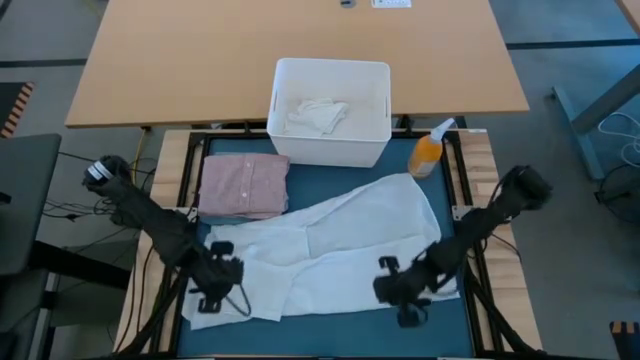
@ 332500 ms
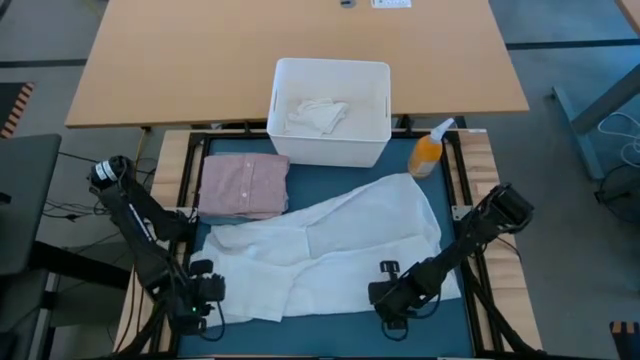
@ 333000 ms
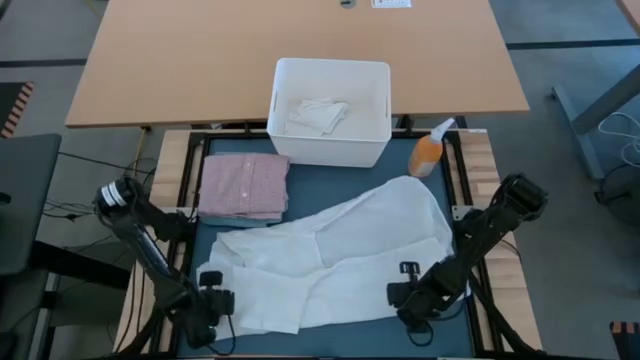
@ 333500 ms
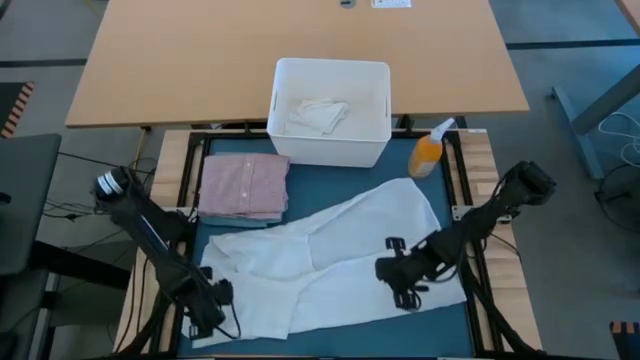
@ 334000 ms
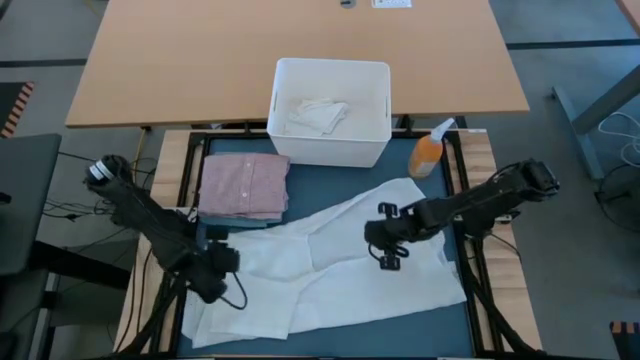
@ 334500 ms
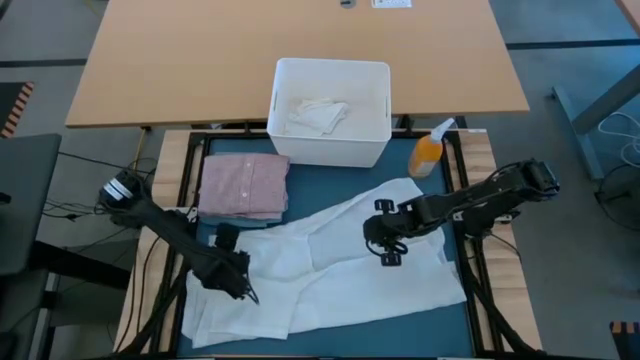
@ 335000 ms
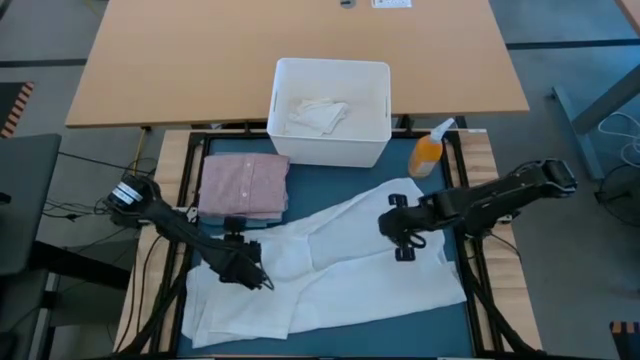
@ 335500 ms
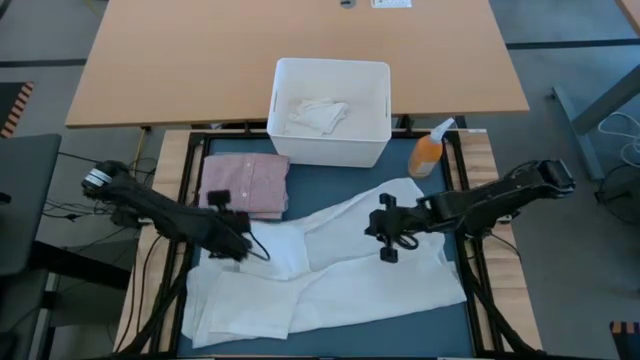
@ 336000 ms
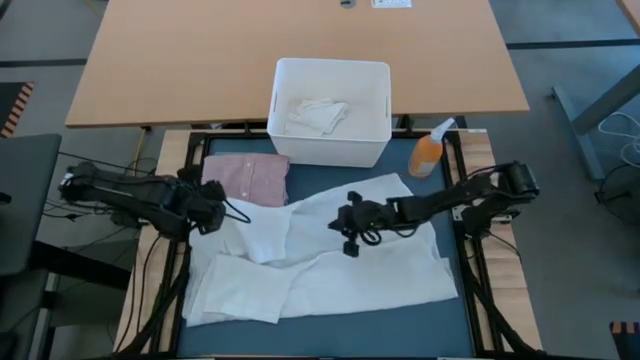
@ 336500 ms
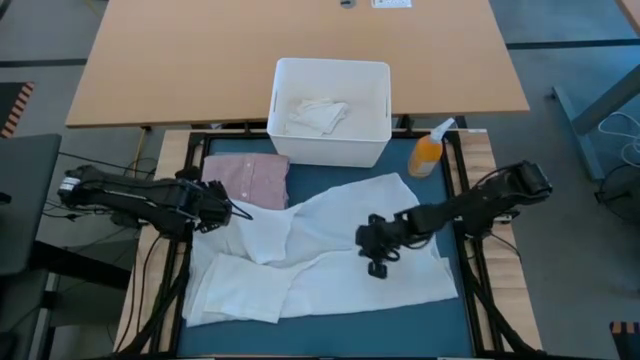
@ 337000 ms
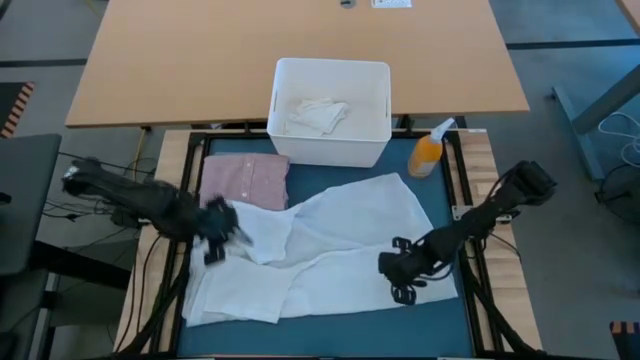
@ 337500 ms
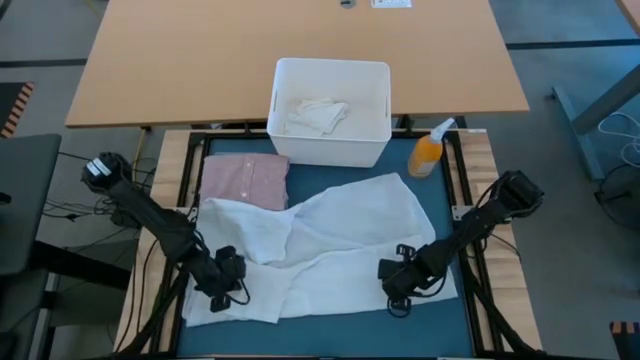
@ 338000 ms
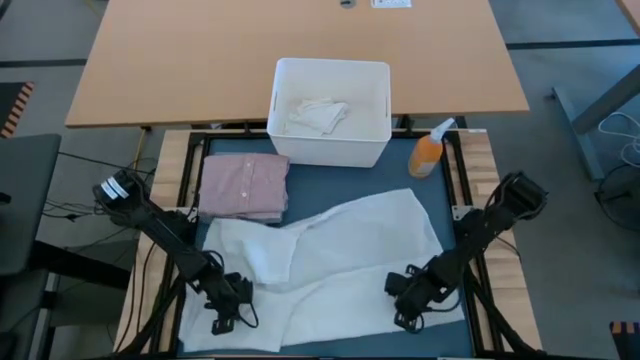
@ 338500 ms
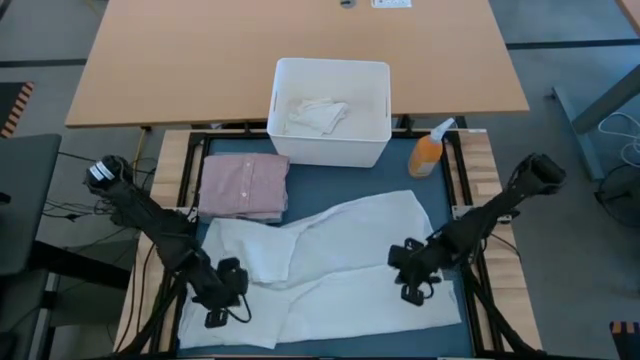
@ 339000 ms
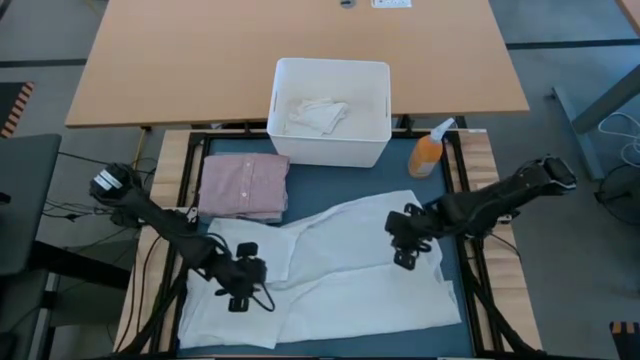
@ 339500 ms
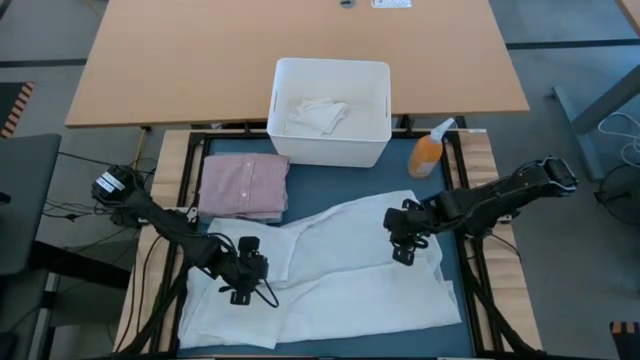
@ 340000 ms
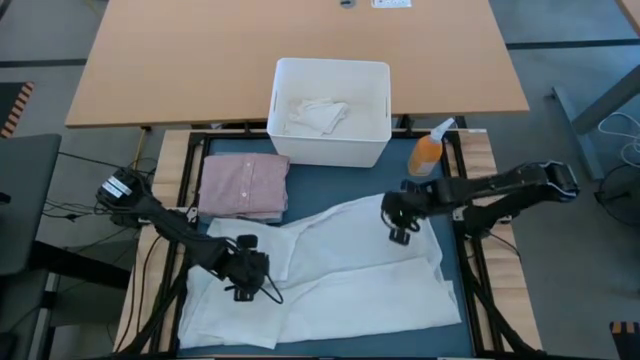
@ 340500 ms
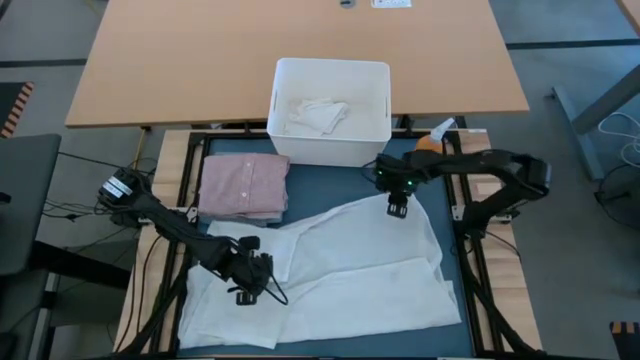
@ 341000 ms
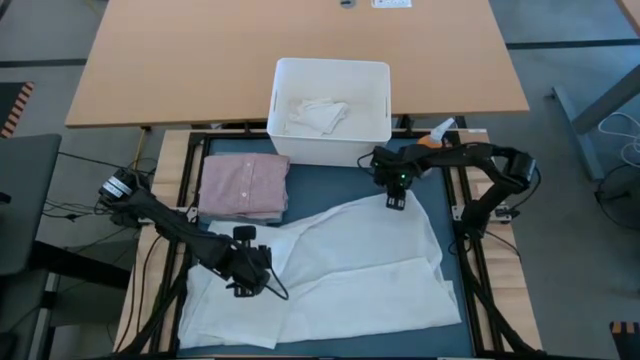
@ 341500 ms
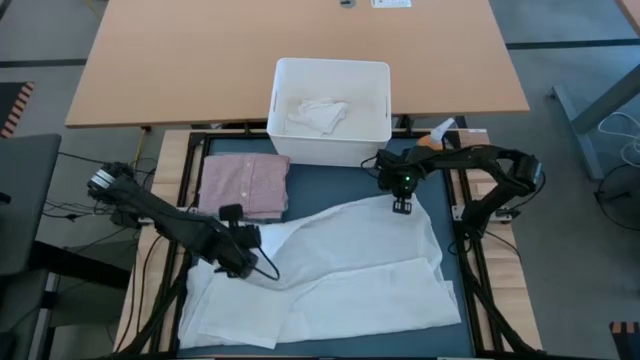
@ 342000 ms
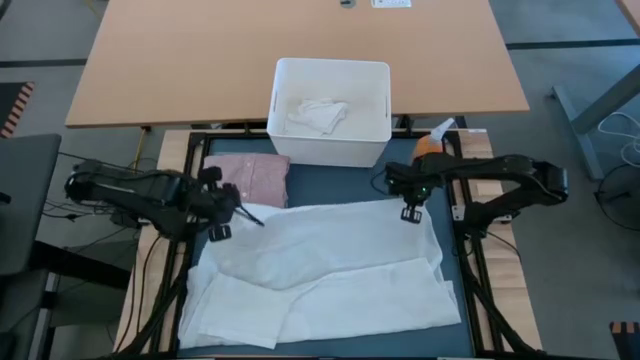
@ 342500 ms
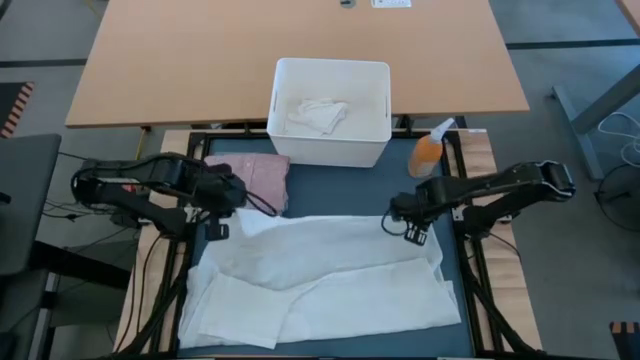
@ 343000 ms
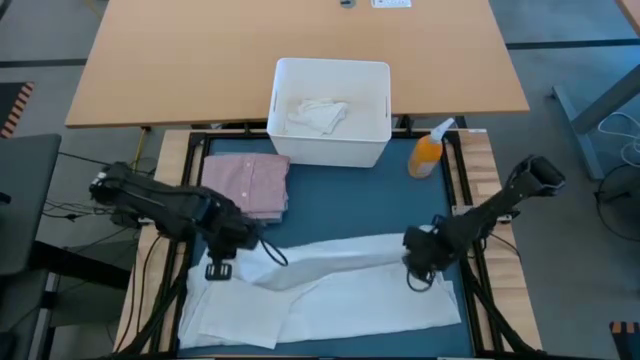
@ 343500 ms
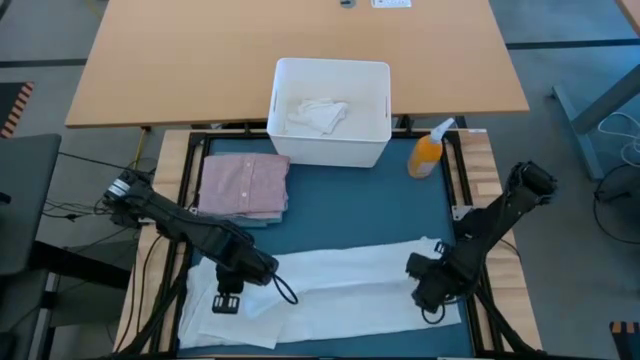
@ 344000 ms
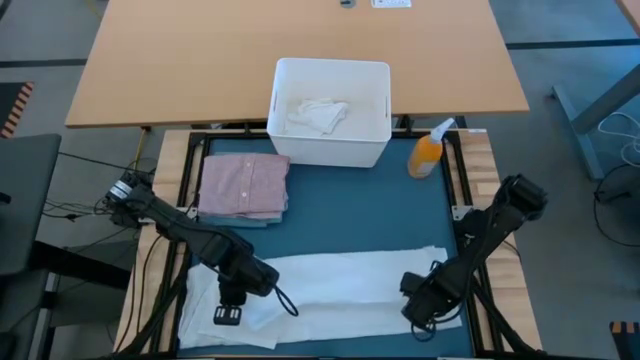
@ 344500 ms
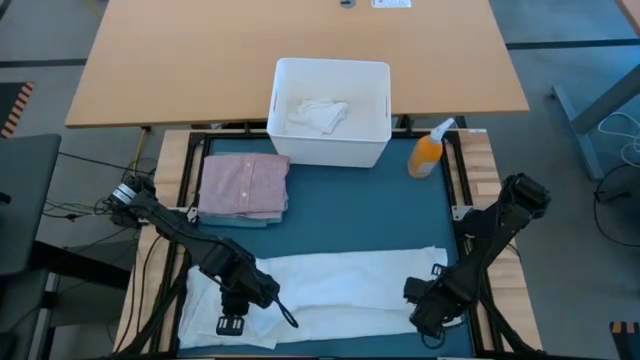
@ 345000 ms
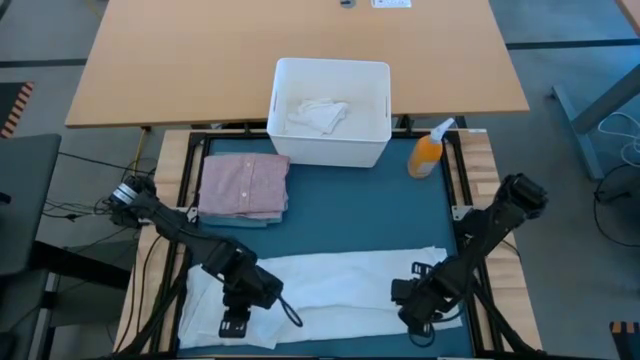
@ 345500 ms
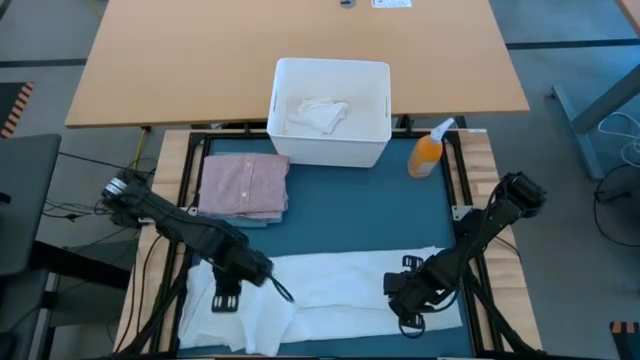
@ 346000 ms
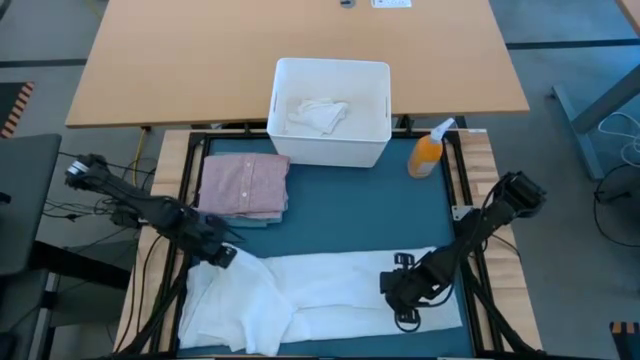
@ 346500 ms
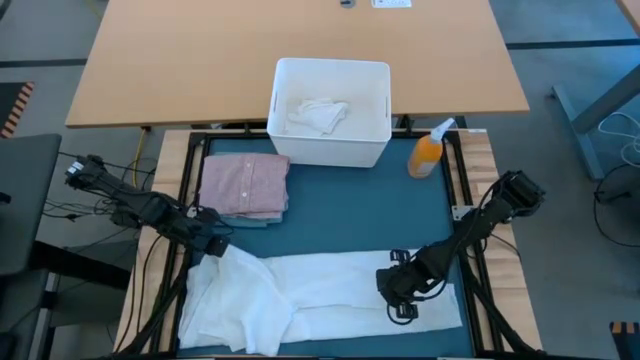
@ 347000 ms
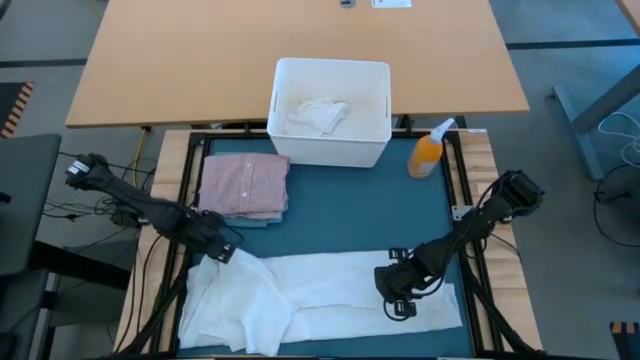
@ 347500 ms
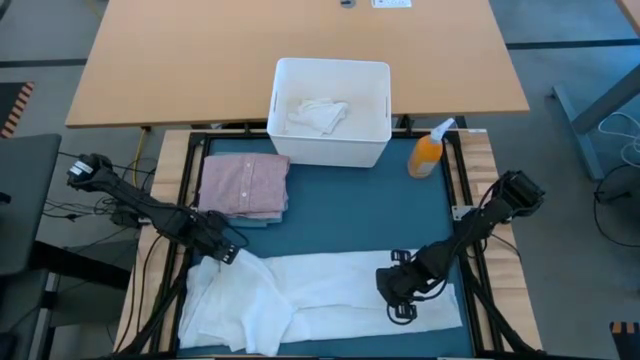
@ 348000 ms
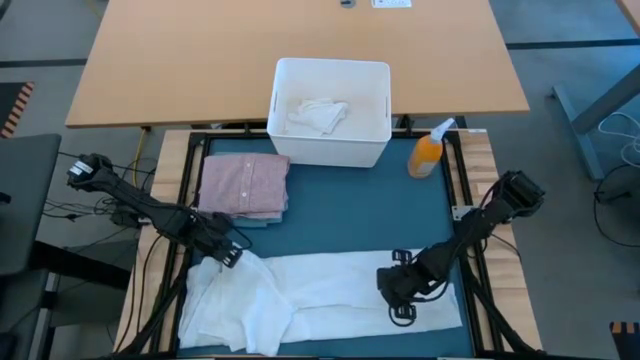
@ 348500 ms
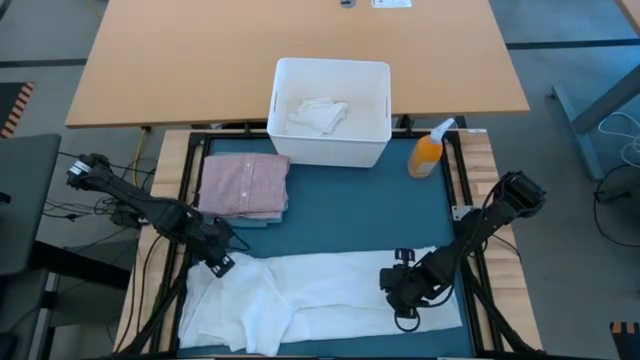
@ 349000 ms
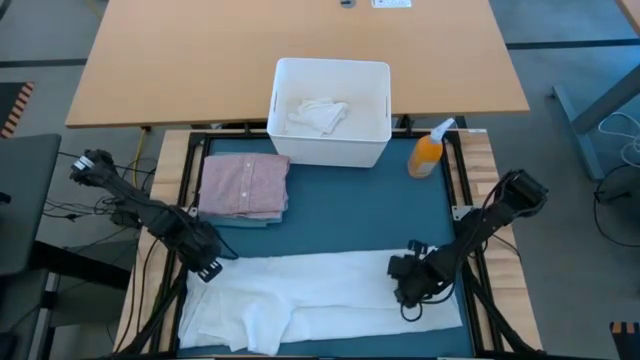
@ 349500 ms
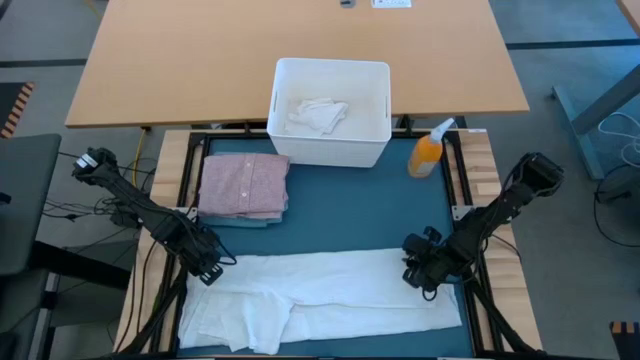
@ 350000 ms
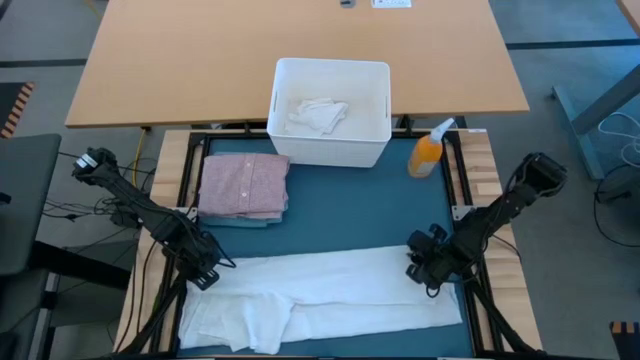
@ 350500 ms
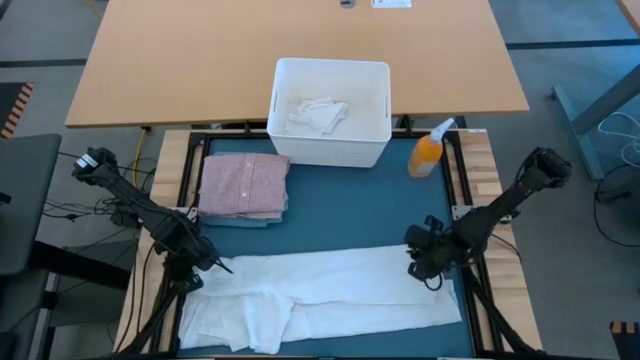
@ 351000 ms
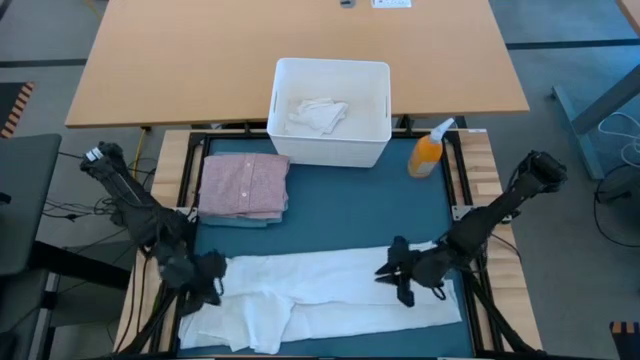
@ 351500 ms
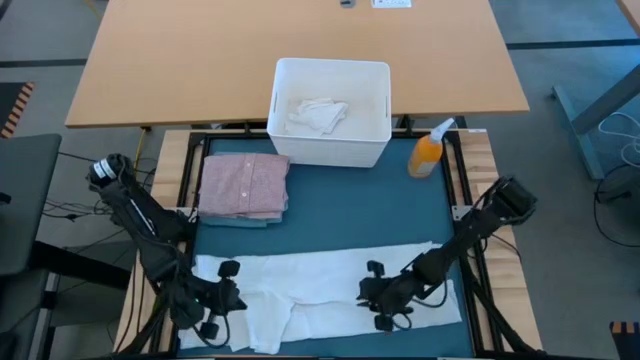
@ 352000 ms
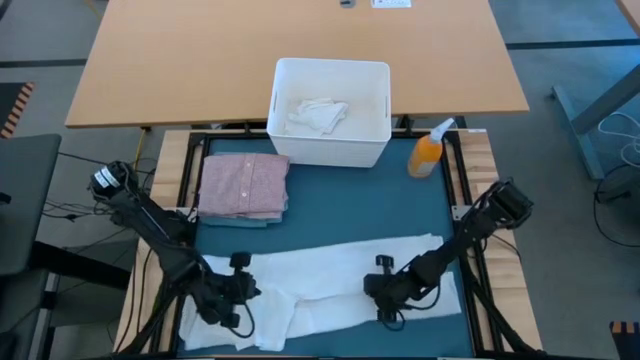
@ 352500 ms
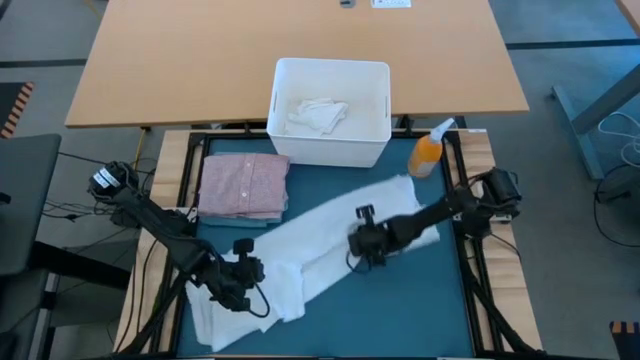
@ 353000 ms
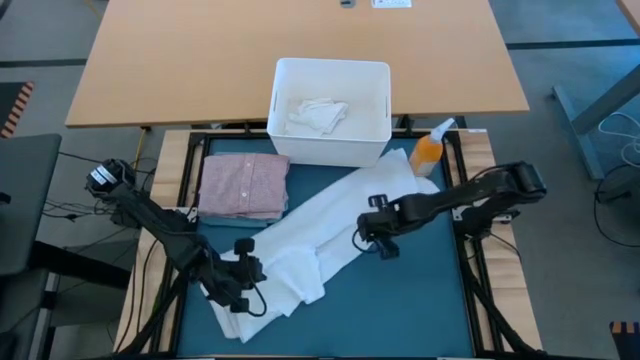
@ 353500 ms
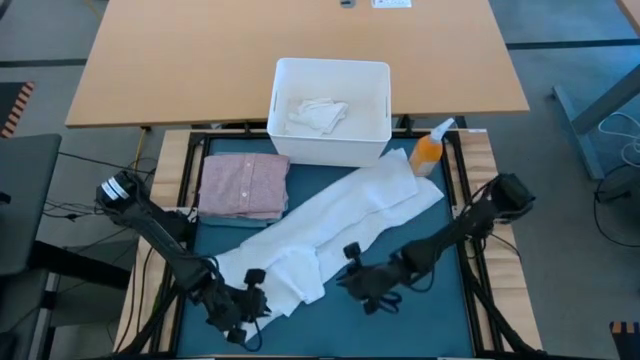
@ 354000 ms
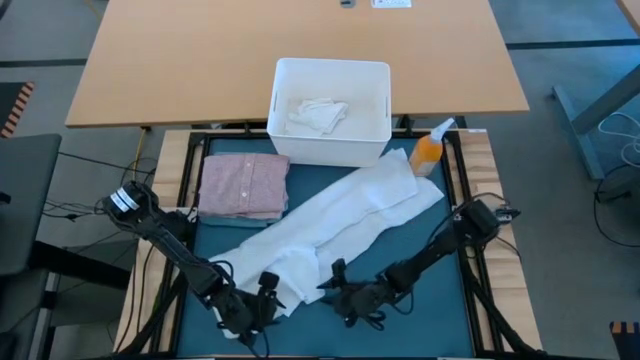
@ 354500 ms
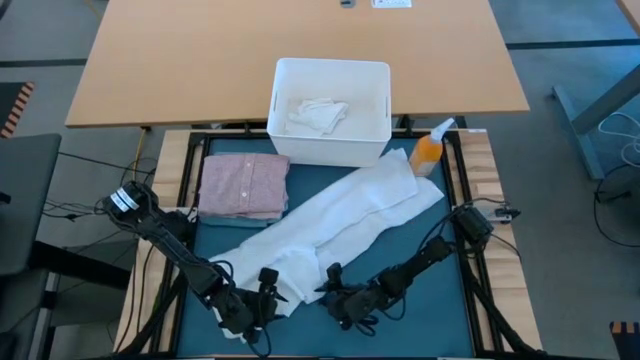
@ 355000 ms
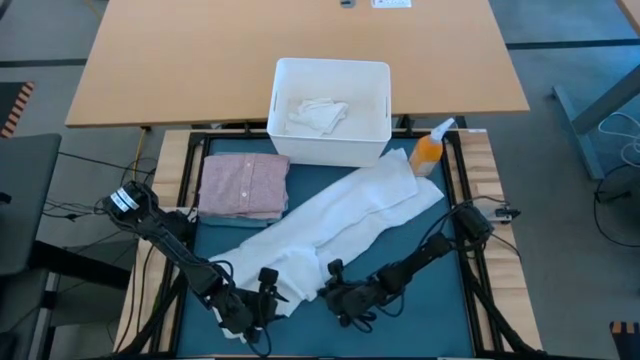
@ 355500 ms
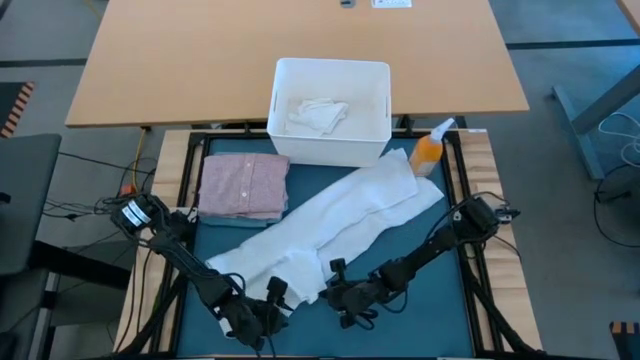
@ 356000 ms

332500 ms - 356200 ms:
Task: Fold Laundry from Bin
Fold the white shirt
